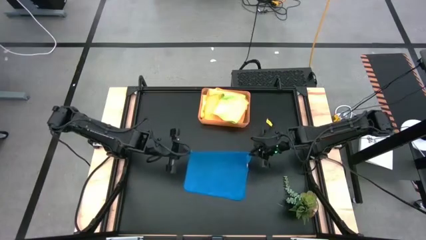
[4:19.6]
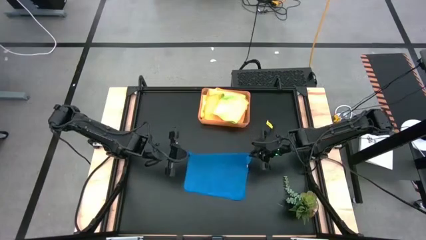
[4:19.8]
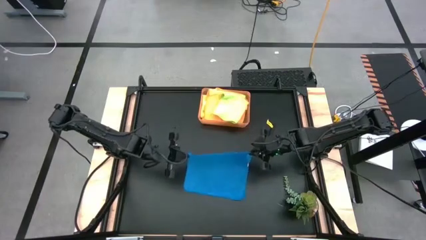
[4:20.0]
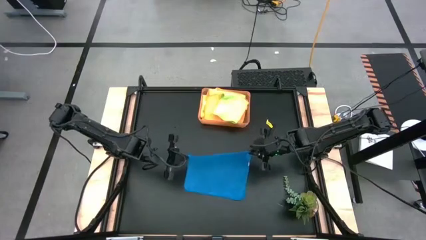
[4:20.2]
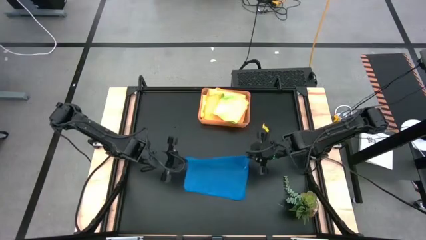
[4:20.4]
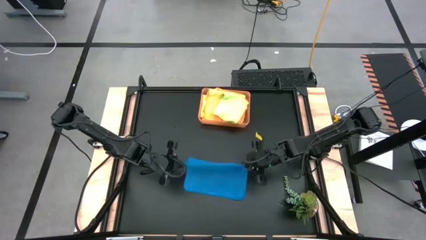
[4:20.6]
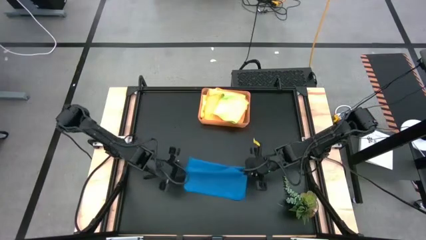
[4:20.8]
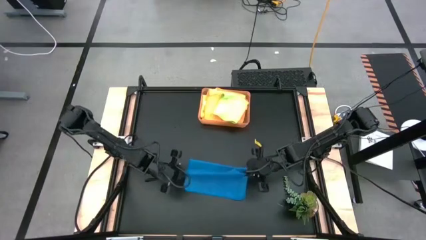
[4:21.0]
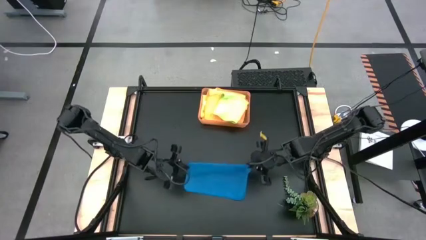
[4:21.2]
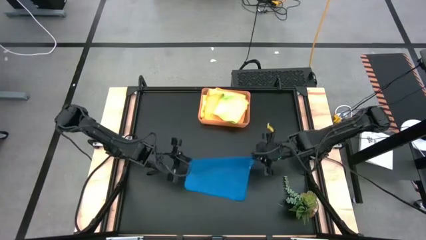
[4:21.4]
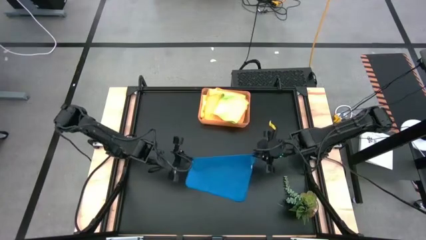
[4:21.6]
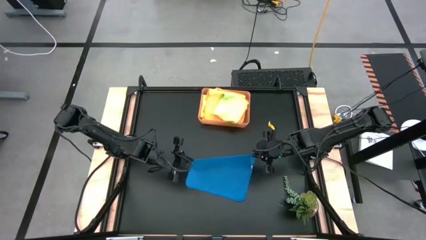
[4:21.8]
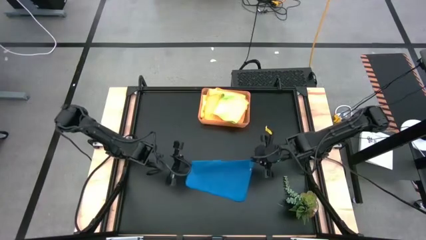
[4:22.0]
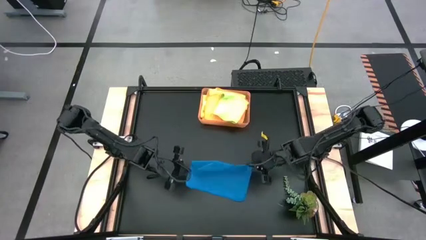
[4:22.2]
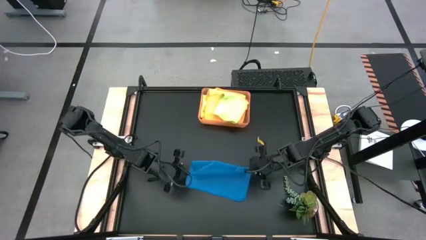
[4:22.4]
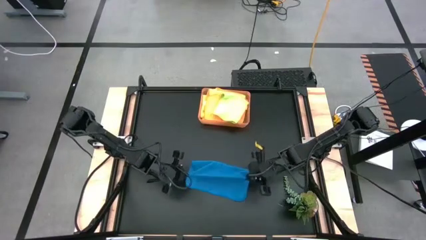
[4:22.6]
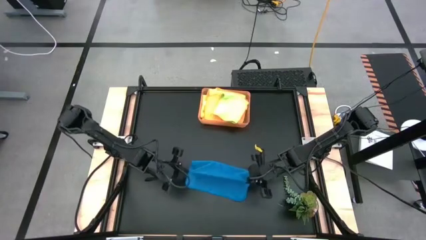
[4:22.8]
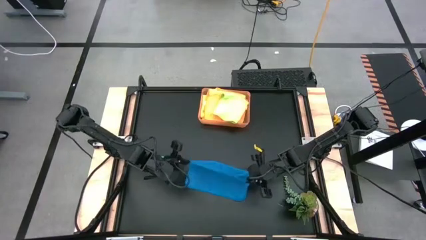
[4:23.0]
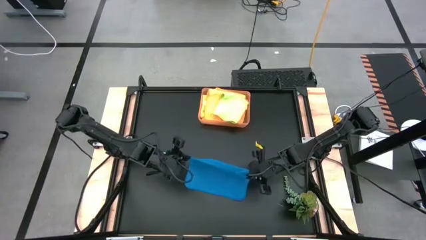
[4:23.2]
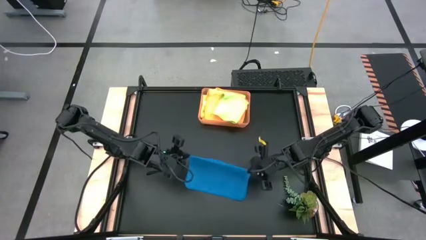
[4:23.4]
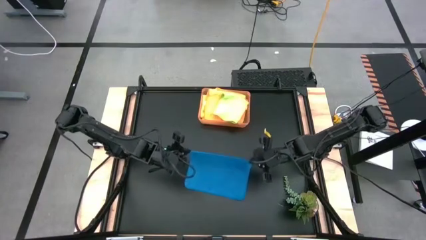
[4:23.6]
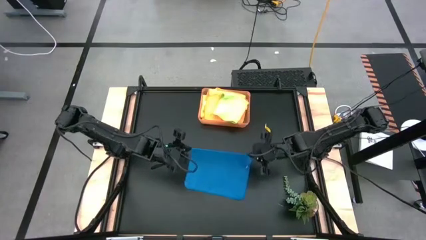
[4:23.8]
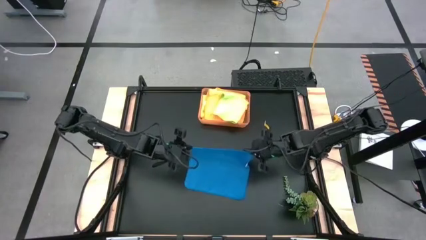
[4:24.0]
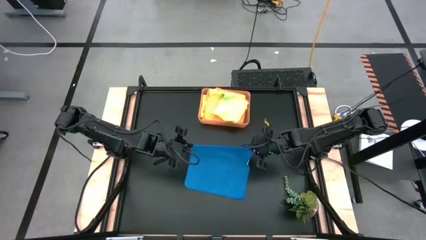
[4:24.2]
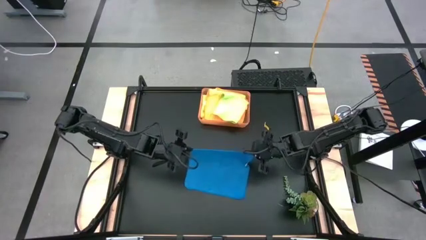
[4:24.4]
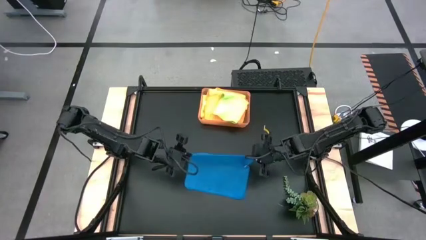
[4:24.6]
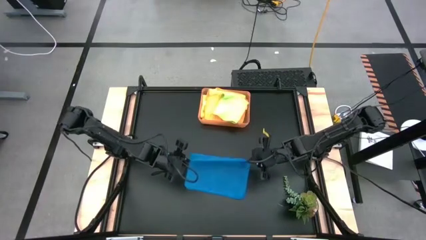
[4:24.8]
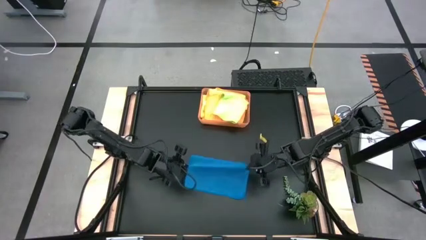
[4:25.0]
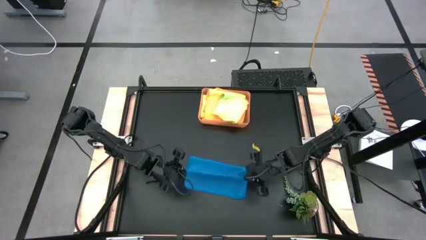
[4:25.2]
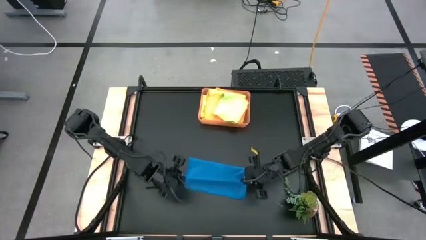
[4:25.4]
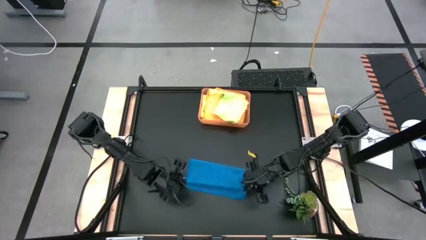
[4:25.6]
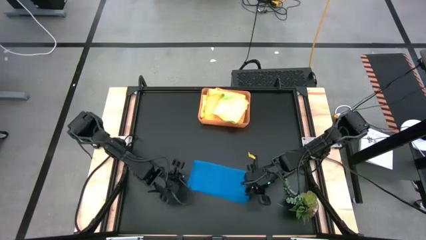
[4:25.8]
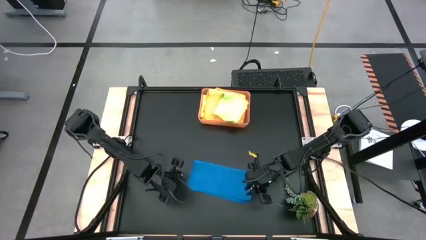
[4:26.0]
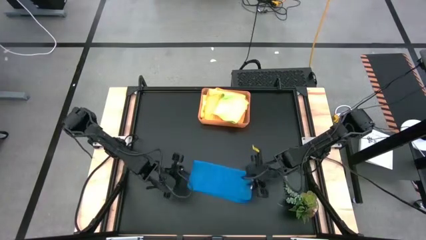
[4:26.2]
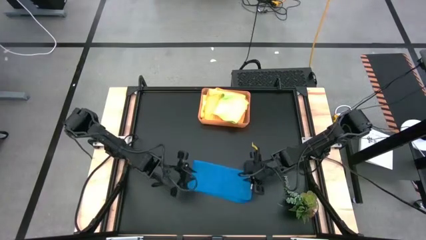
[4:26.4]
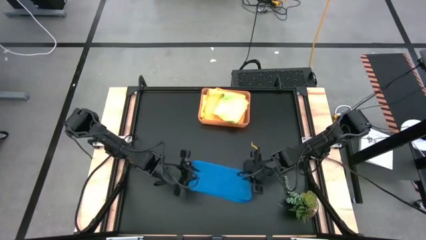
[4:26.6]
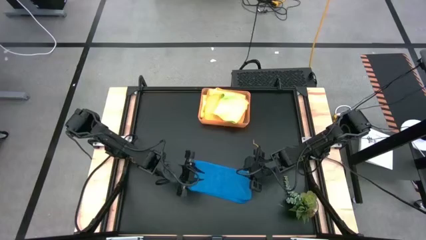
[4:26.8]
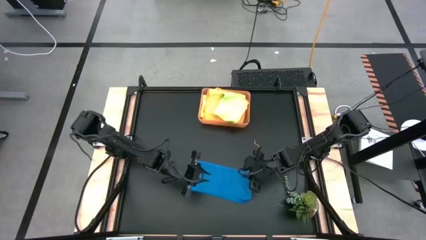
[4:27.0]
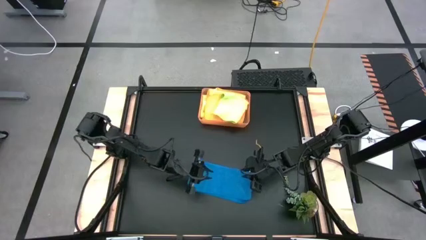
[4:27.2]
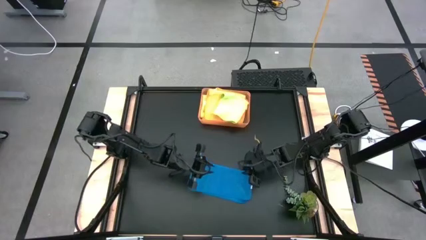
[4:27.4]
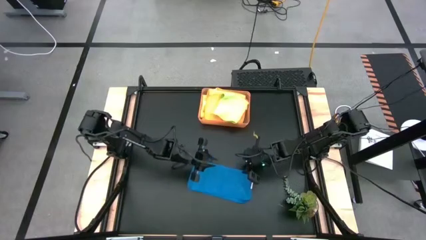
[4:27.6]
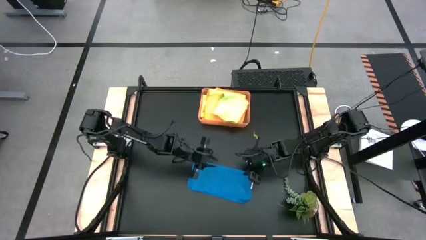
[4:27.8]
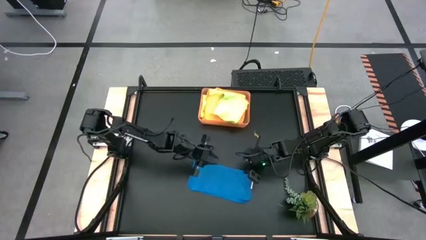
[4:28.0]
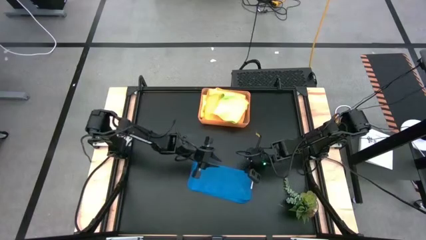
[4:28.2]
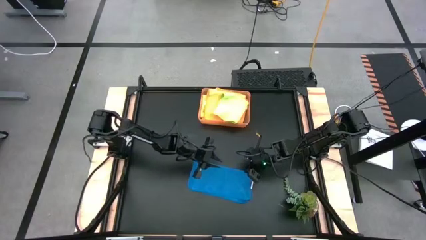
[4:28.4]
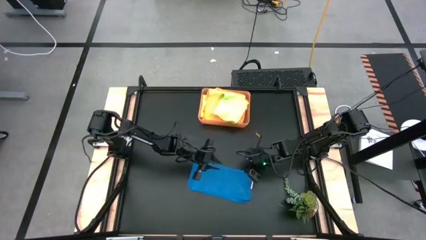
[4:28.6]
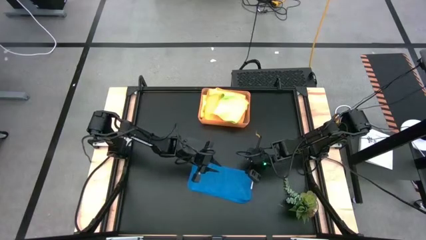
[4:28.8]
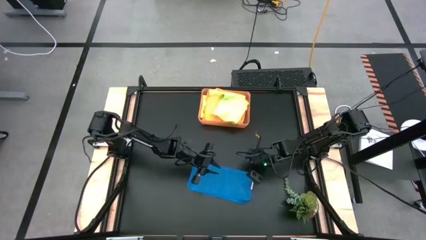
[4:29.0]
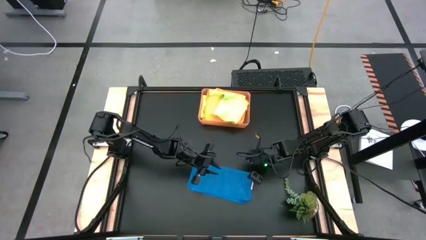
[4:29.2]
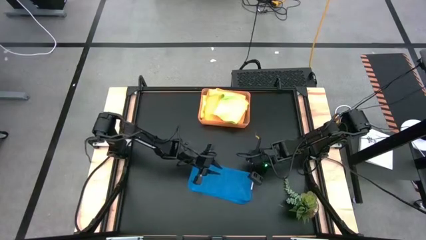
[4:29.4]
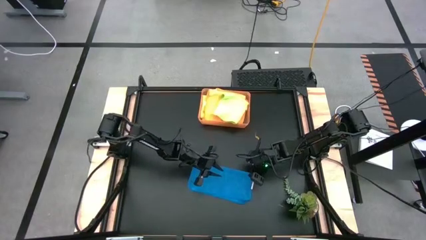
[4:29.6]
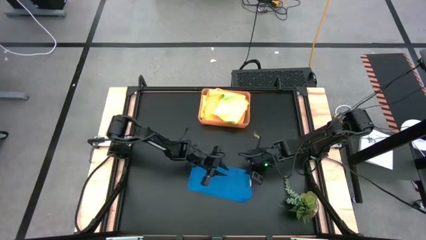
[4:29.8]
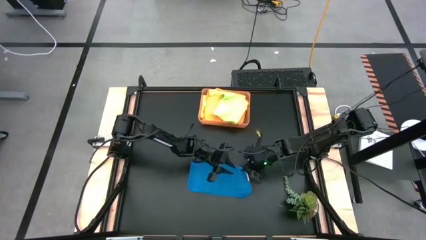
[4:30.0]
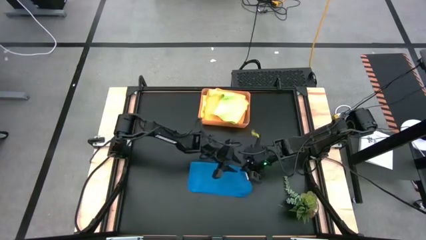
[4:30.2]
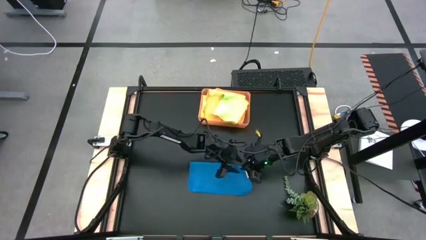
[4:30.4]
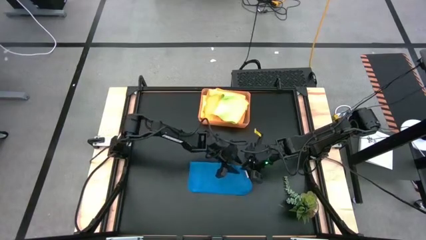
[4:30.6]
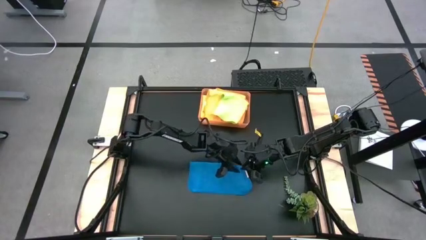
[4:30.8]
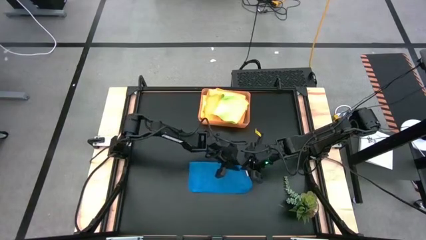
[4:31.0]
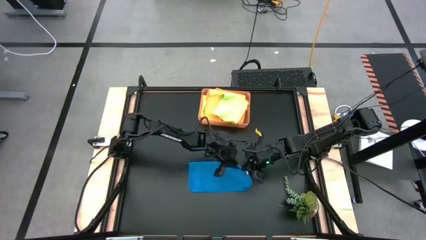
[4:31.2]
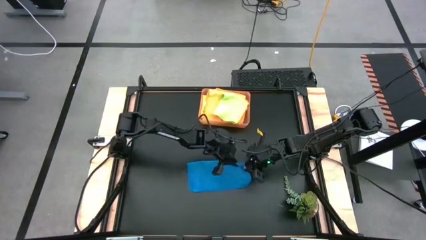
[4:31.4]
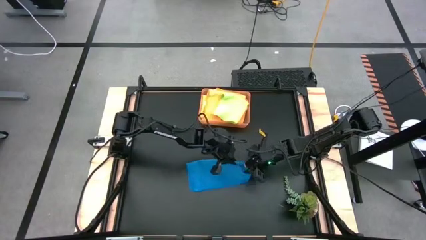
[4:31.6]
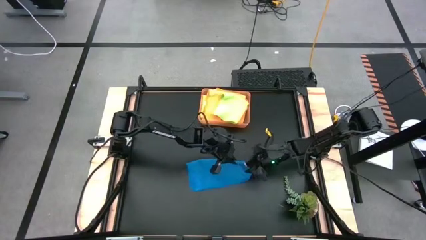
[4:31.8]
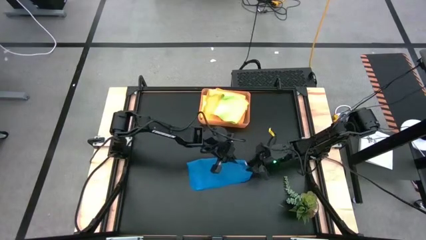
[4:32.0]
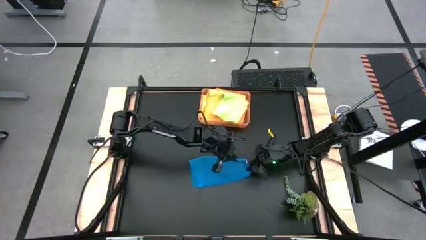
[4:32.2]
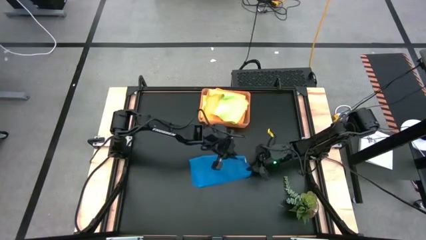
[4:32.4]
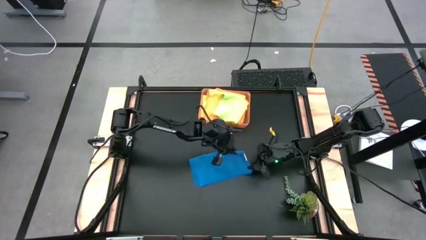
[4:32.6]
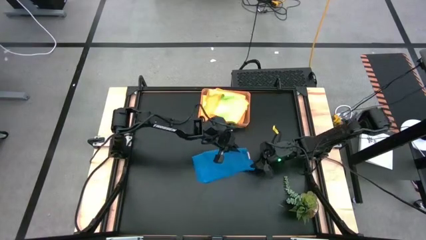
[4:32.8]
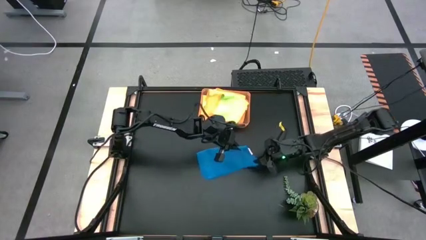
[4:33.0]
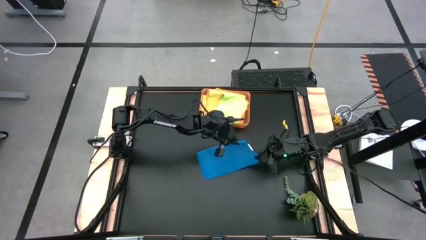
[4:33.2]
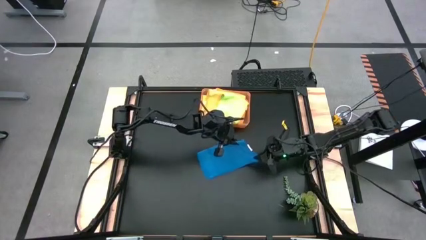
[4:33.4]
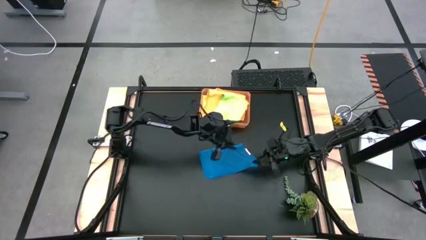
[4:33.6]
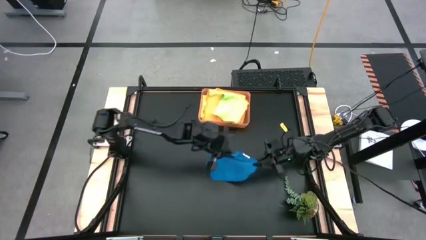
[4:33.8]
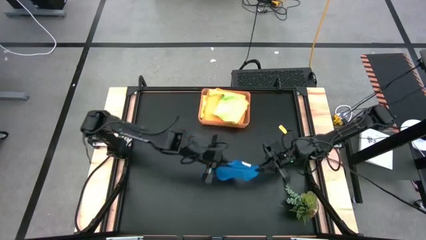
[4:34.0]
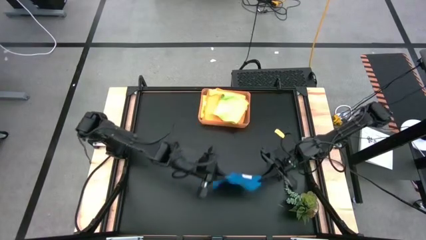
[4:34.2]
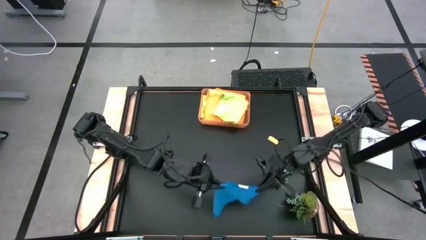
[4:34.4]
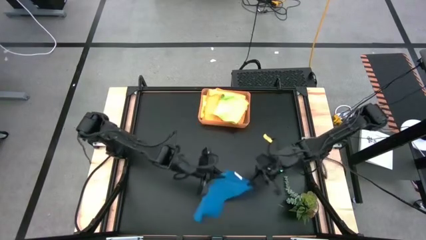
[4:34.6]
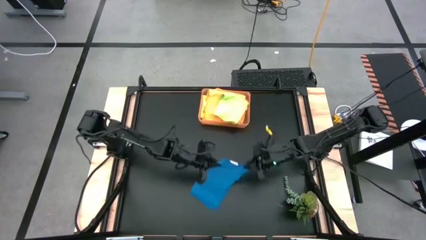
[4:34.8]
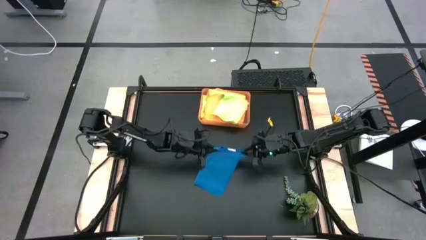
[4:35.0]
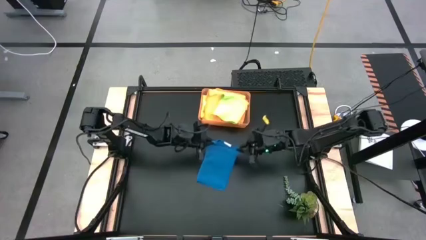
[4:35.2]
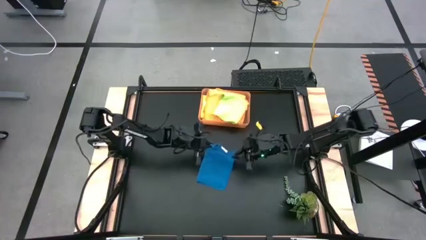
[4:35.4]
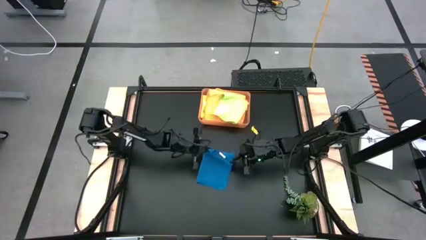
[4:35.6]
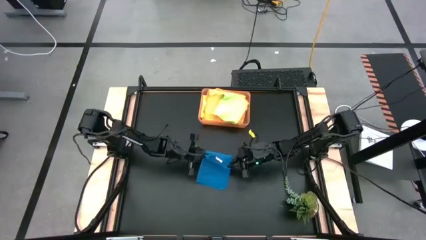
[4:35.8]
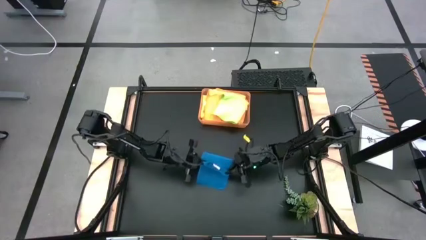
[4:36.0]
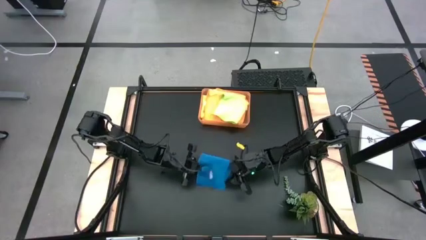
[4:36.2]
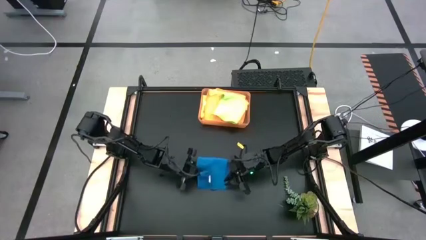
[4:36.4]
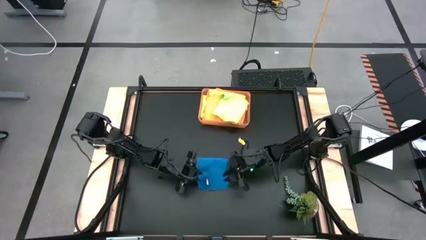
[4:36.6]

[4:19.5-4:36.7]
Task: Fold microfiber towels
Fold the blue towel
